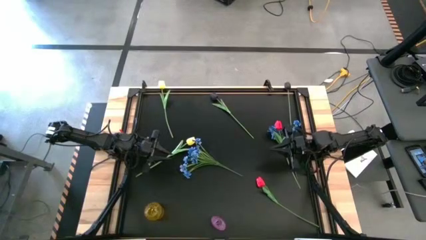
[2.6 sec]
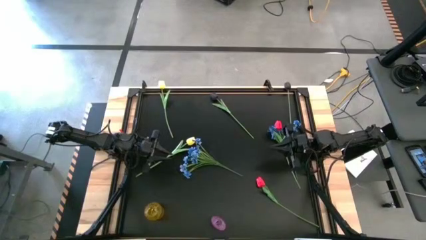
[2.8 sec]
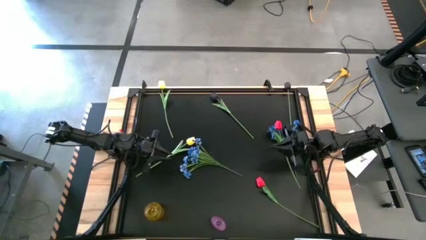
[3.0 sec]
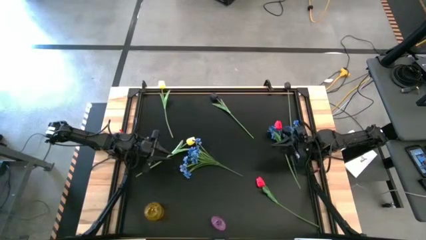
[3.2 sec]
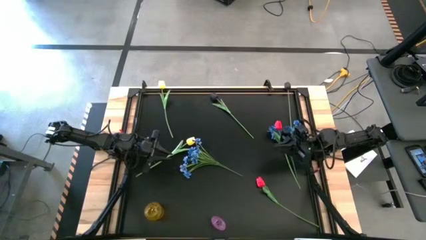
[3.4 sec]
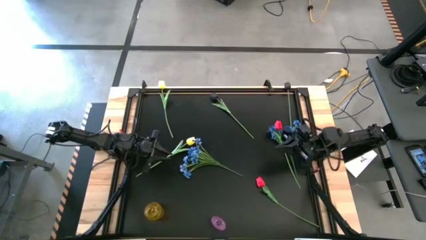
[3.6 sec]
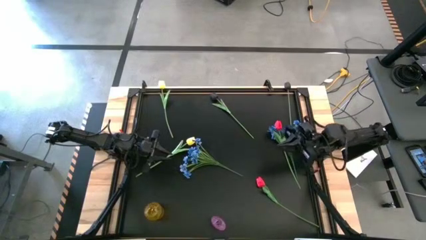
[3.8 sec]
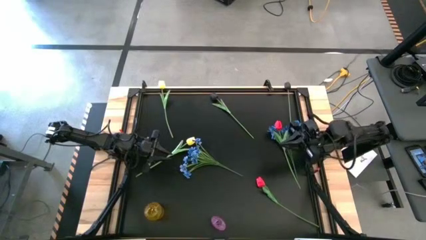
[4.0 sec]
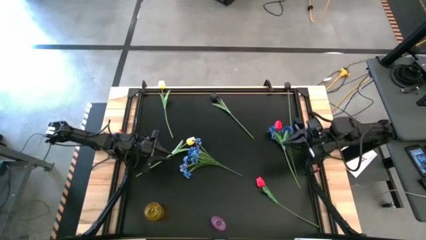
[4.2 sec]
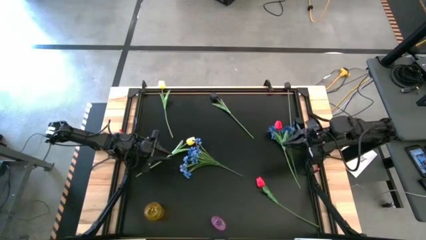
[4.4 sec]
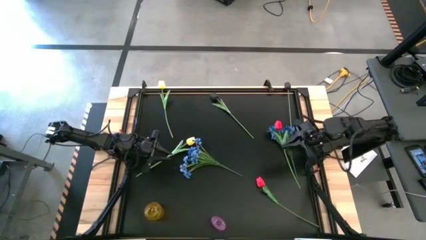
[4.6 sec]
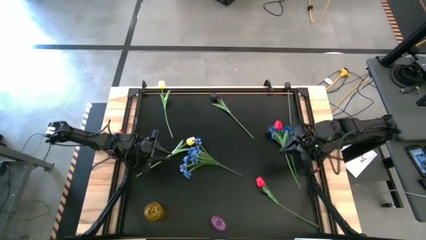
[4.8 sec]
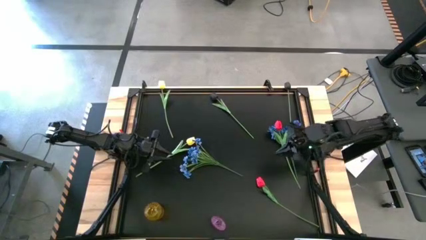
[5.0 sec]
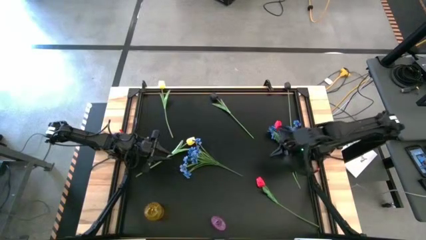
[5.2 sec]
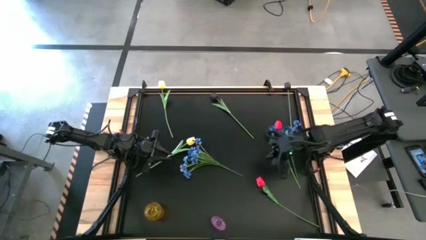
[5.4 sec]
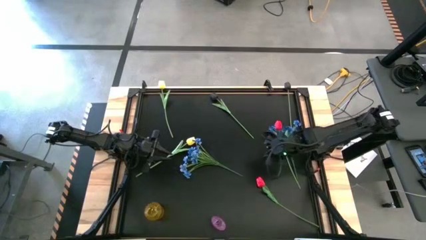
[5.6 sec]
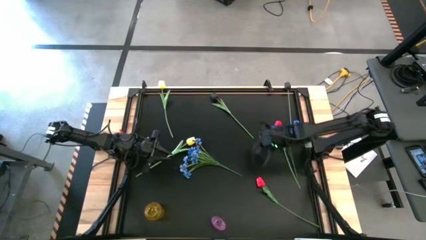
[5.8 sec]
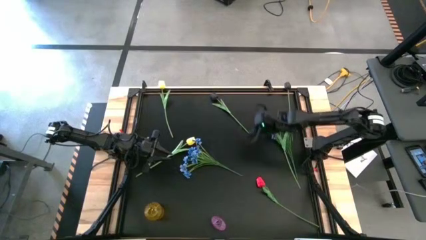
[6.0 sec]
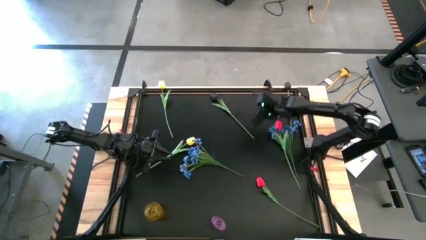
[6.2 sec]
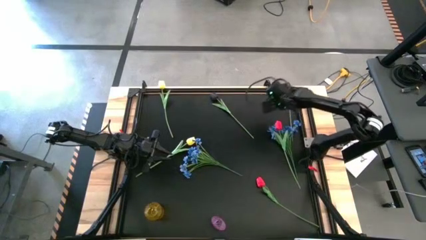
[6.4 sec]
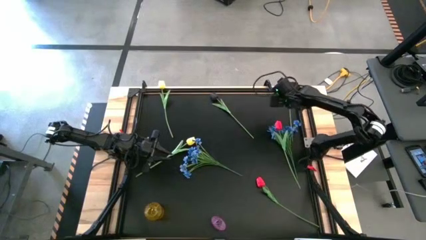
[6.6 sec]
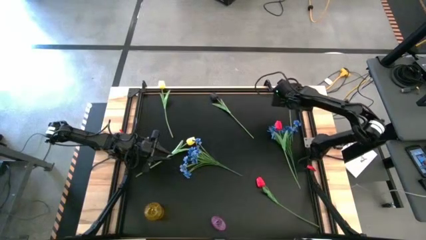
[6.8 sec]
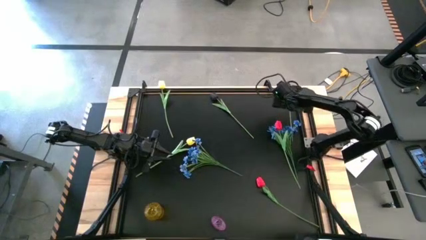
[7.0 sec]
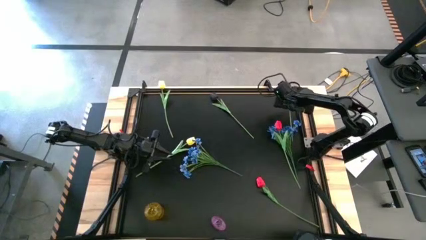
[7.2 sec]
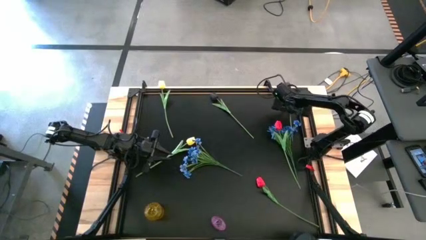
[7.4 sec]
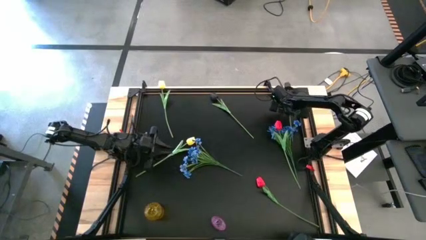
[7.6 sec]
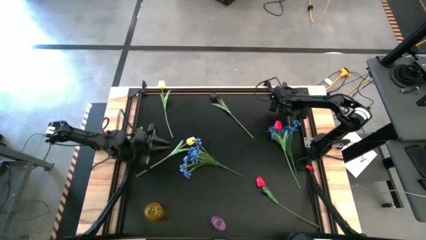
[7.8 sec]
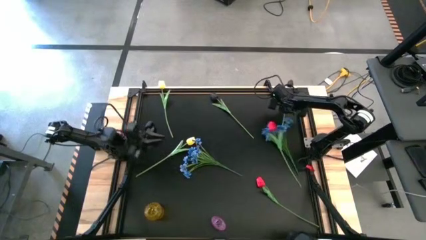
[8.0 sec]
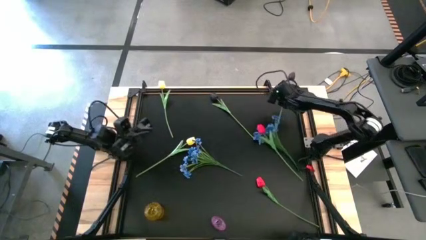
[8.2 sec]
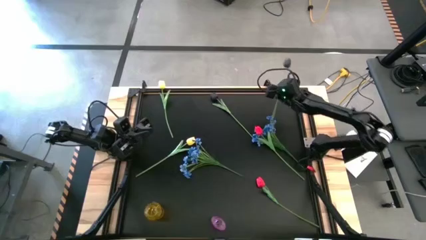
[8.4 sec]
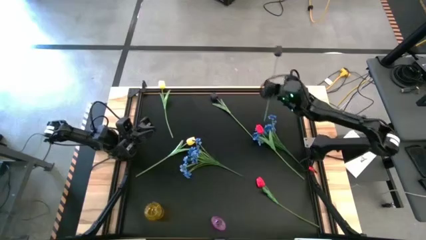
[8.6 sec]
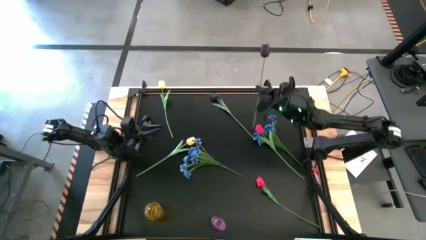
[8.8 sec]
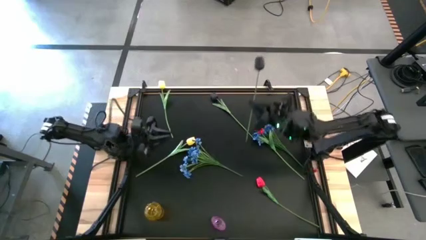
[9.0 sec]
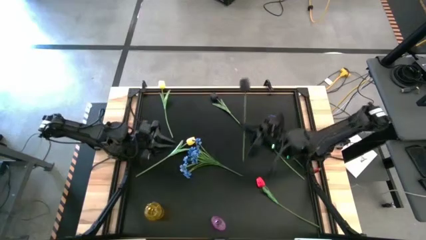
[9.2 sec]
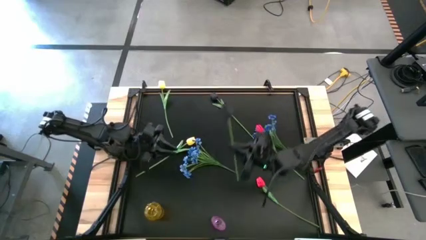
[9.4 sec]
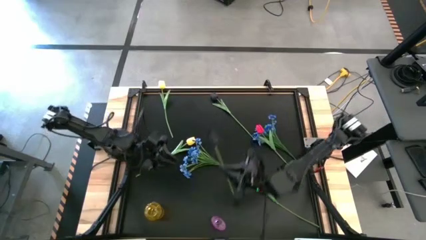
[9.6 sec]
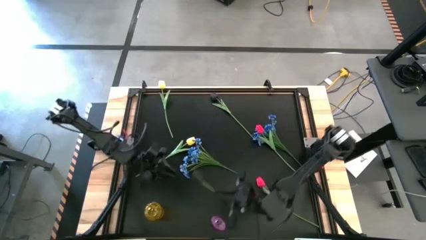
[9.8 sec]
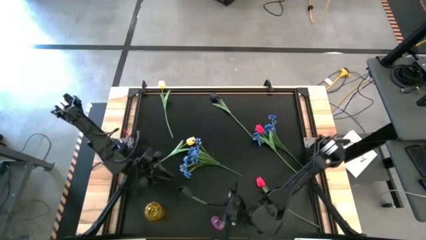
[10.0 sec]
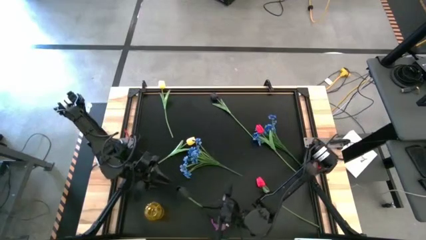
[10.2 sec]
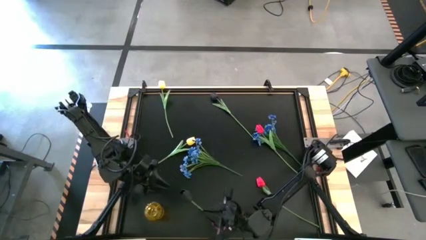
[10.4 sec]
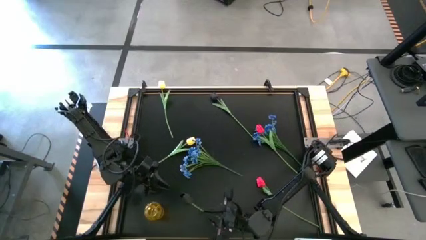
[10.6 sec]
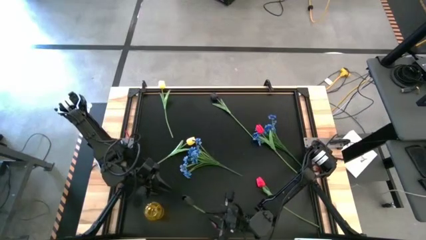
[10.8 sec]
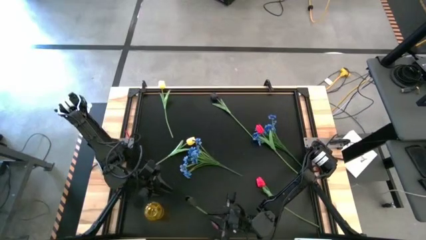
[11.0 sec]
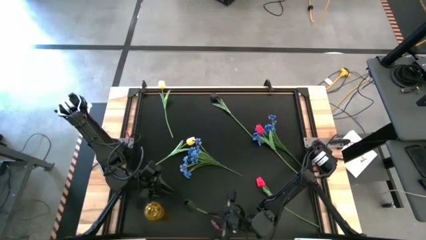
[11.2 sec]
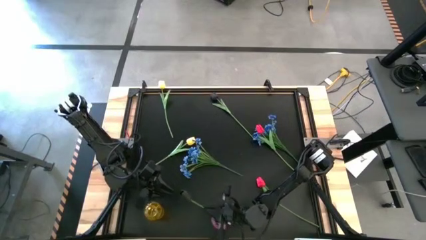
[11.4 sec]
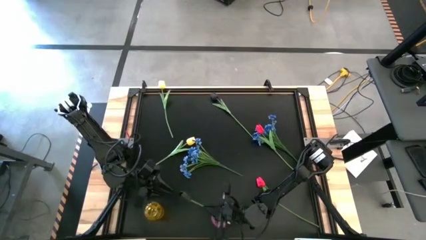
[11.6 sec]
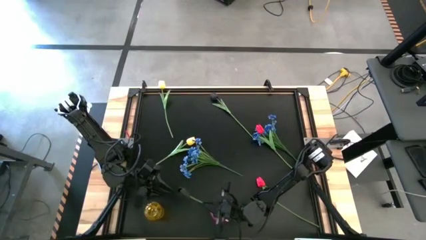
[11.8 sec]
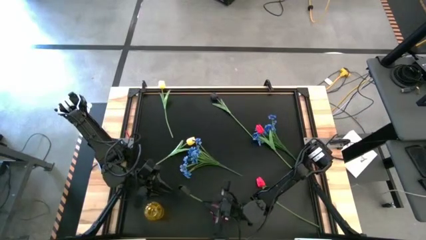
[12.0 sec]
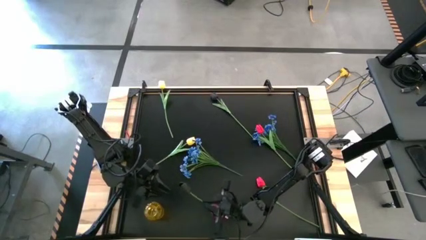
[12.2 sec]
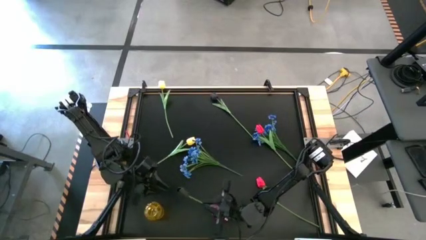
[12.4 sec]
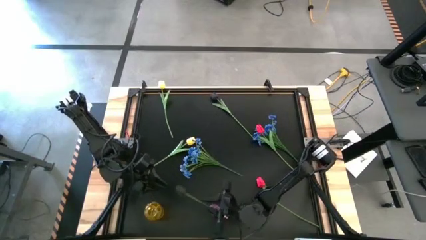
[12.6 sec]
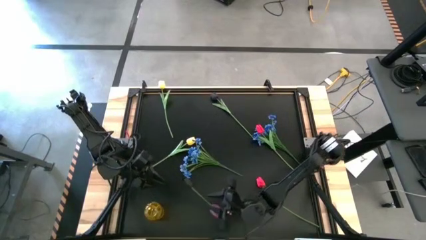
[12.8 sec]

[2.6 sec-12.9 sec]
Task: Sort flowers into vase by color
Put the right black tulip into the violet vase

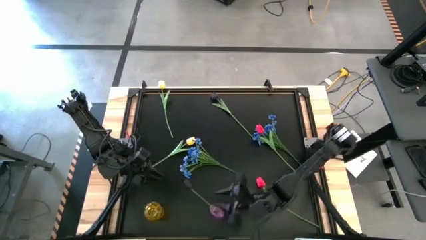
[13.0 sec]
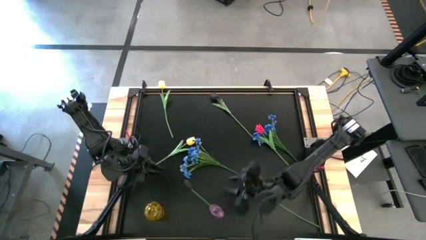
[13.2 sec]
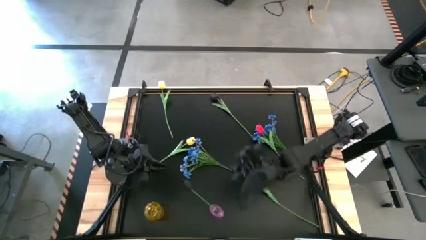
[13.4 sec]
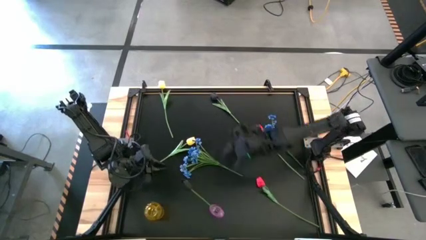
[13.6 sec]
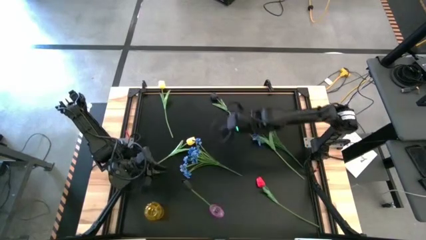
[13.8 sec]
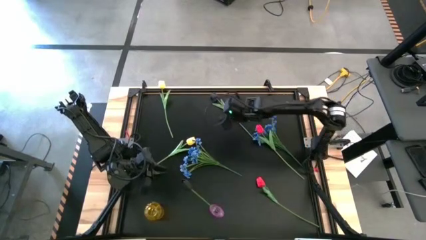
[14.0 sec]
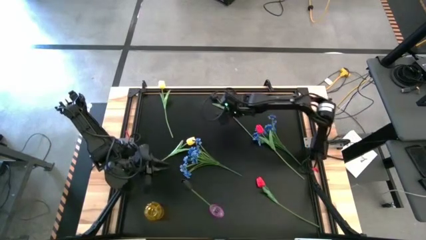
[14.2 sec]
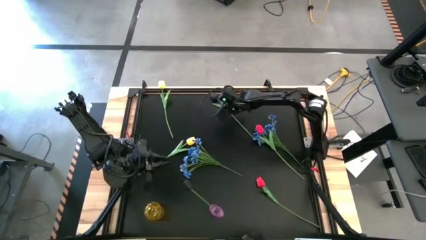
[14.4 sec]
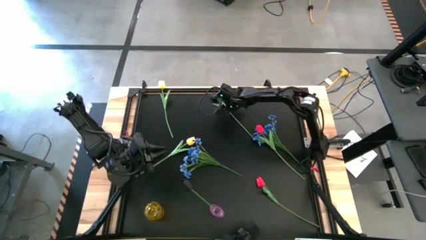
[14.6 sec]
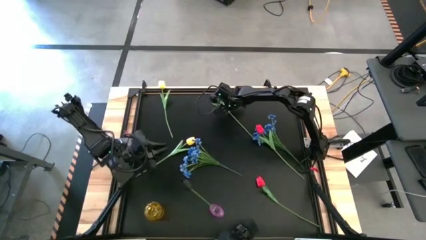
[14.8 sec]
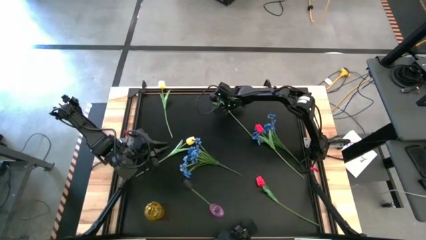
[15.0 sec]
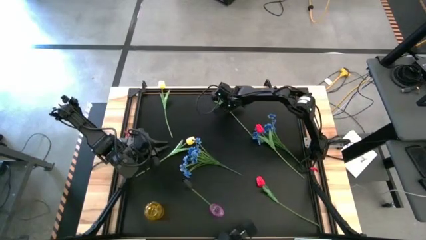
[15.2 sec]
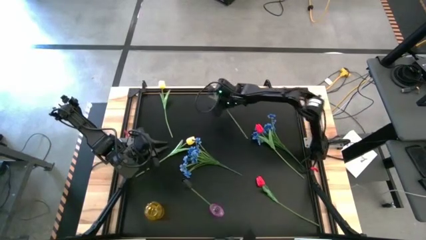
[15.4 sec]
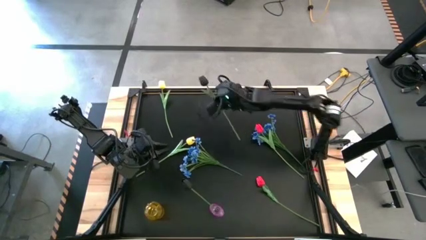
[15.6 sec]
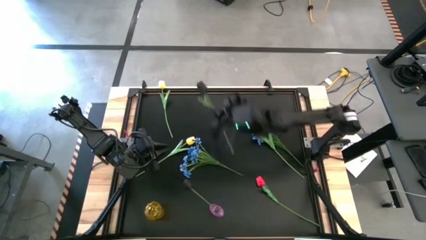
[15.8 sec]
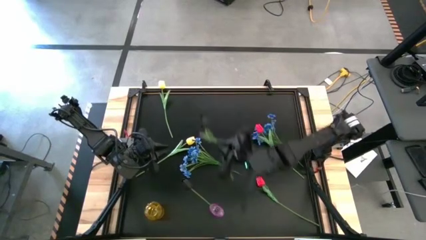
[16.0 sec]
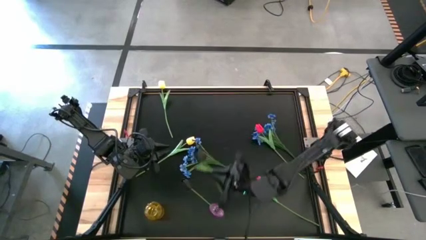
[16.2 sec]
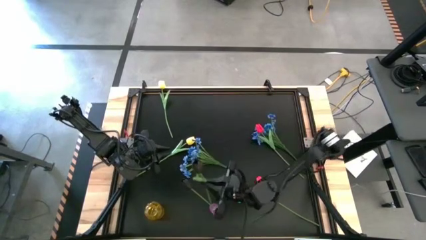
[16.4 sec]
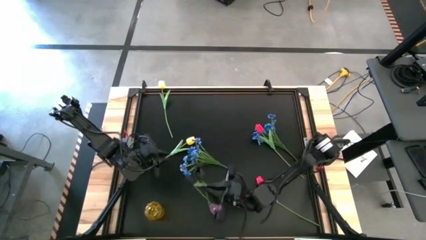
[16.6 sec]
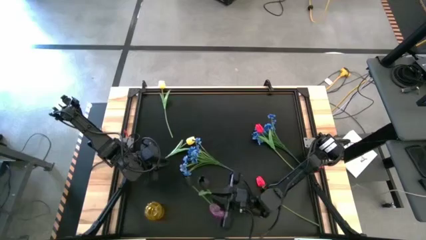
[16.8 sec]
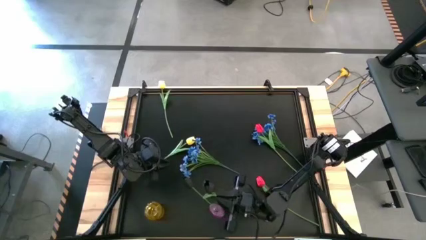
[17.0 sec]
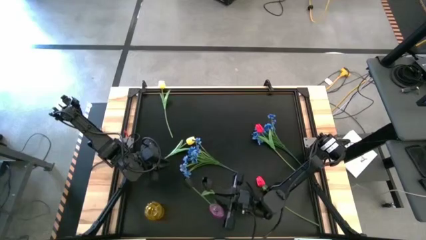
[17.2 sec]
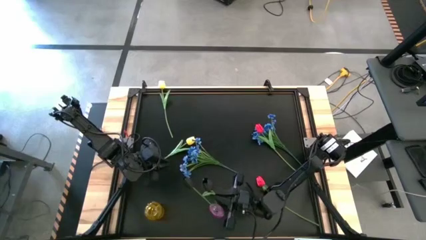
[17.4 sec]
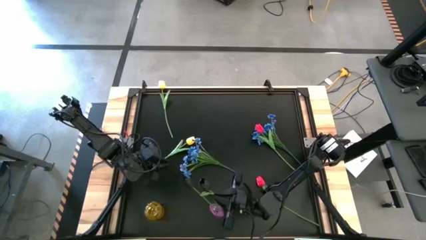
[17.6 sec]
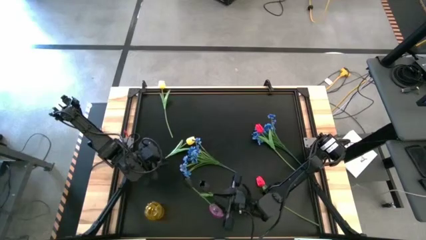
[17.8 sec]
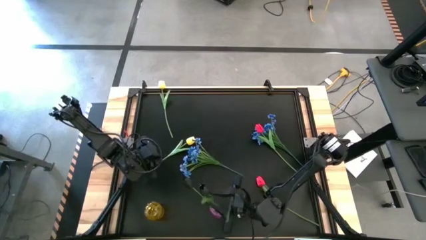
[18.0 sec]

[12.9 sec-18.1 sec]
Put the black tulip into the violet vase
